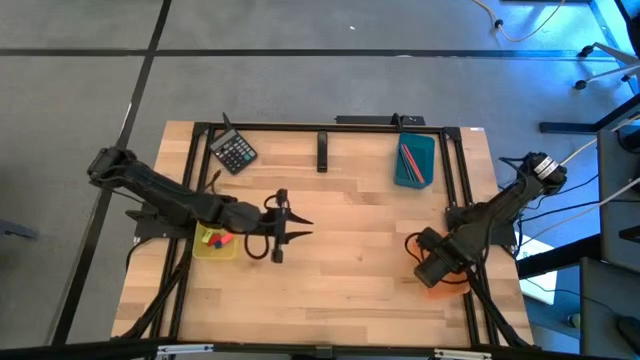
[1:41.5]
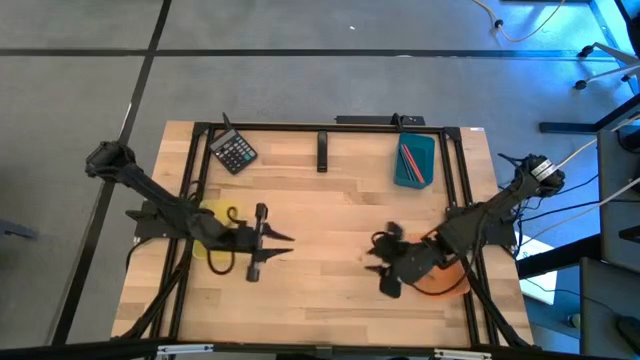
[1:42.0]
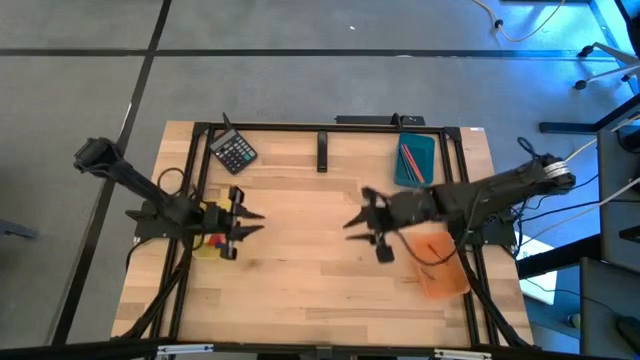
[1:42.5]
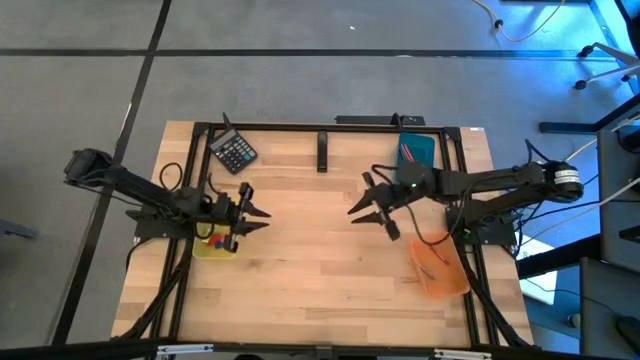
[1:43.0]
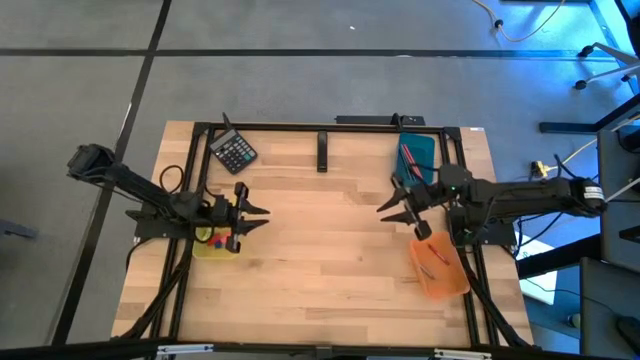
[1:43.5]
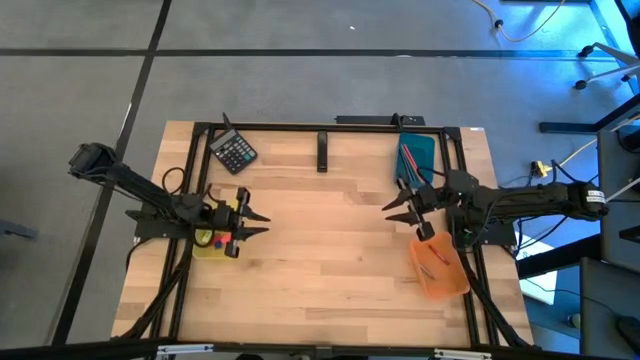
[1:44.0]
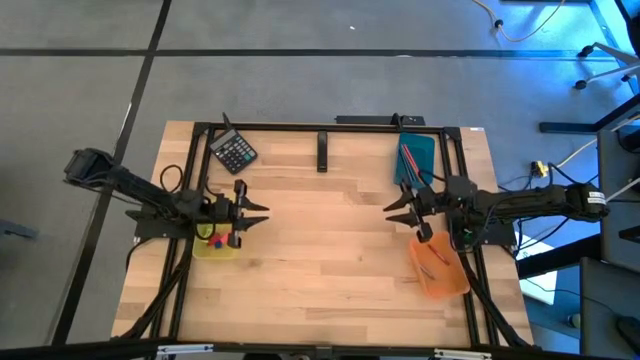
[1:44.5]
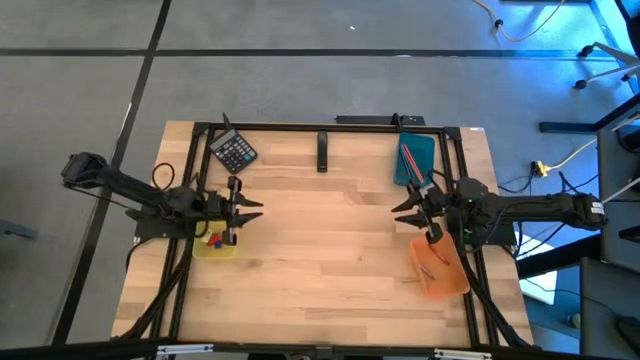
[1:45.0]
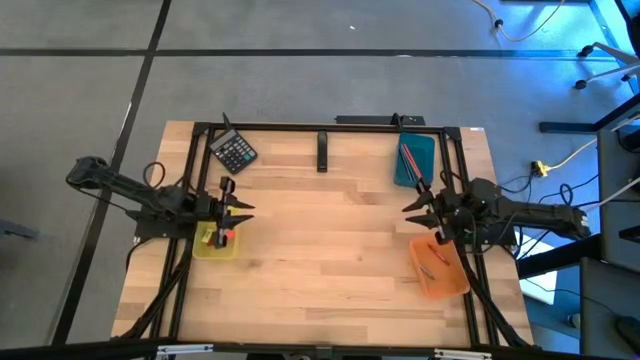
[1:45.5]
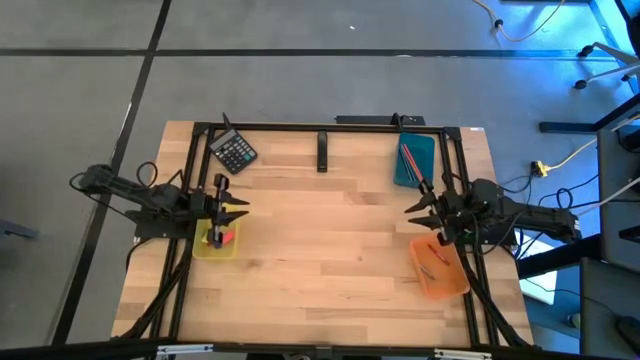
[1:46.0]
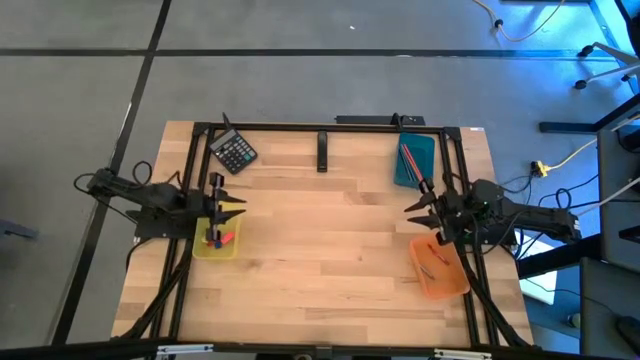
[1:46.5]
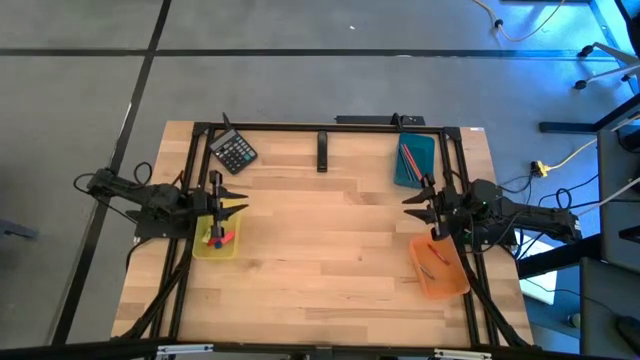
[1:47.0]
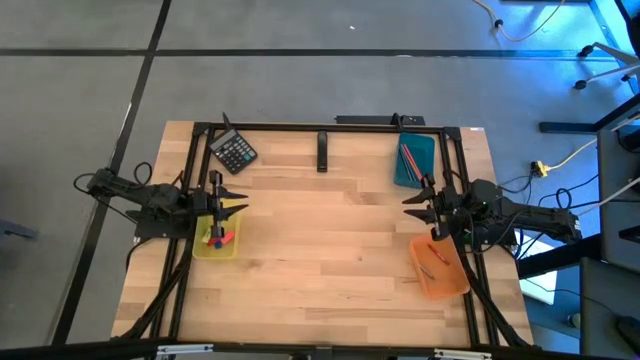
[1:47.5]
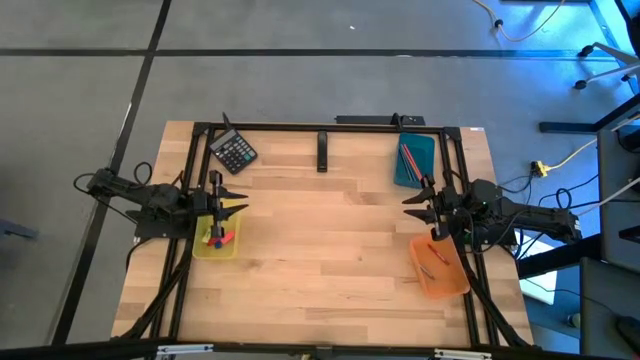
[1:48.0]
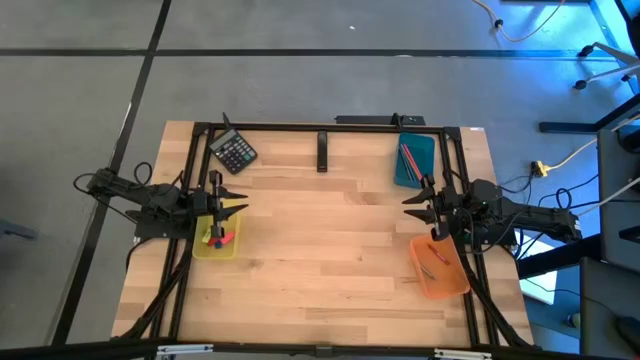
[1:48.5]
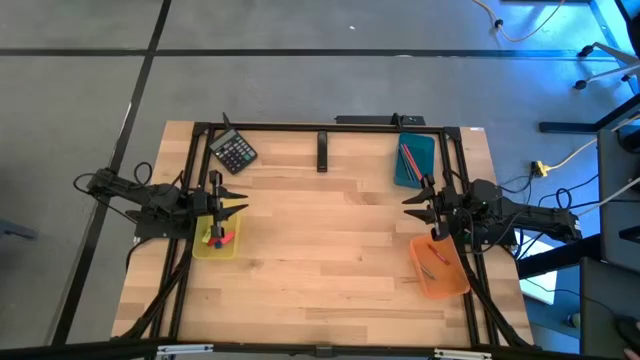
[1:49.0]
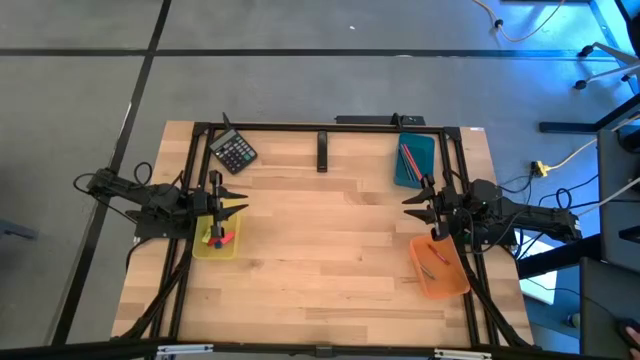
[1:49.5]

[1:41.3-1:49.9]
Task: Sort crayons/erasers/pens/pencils in bins
Return to Home Position

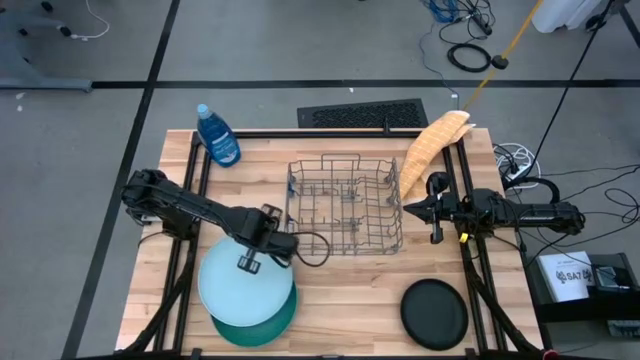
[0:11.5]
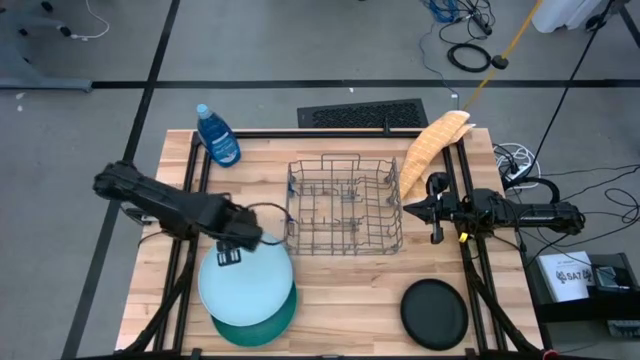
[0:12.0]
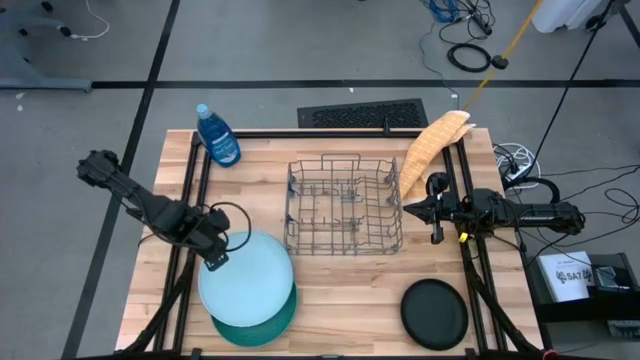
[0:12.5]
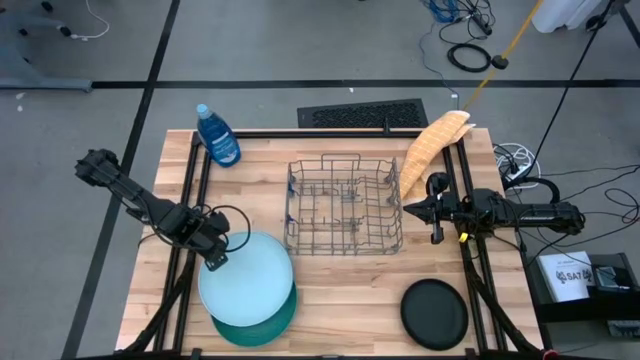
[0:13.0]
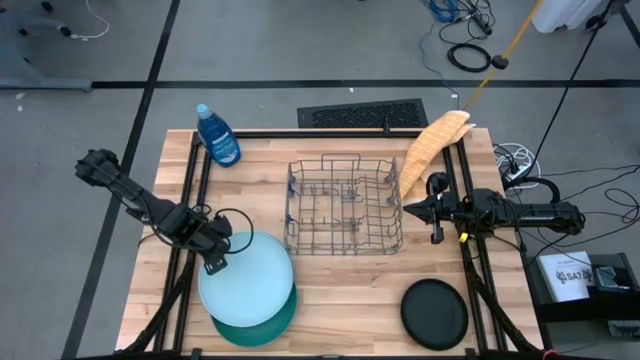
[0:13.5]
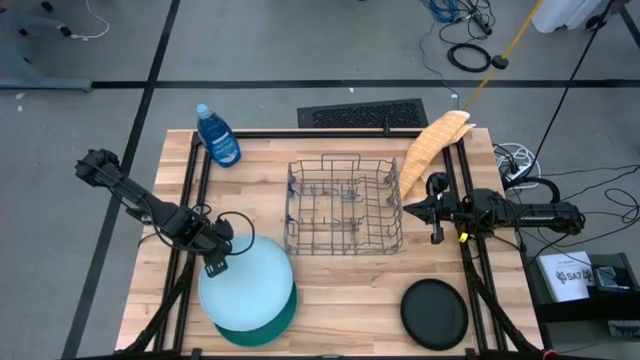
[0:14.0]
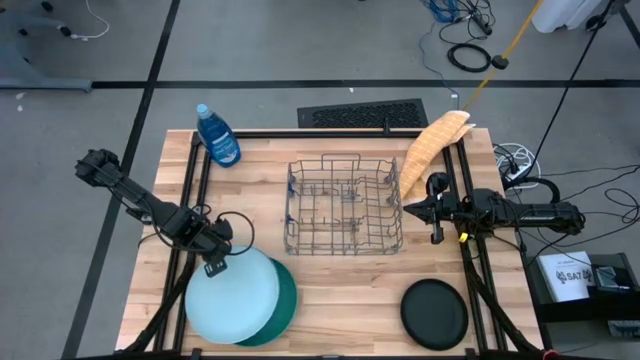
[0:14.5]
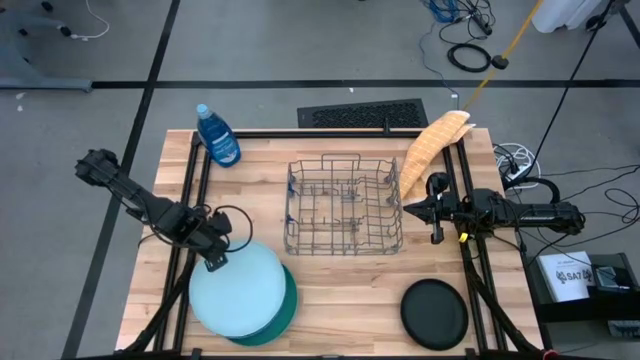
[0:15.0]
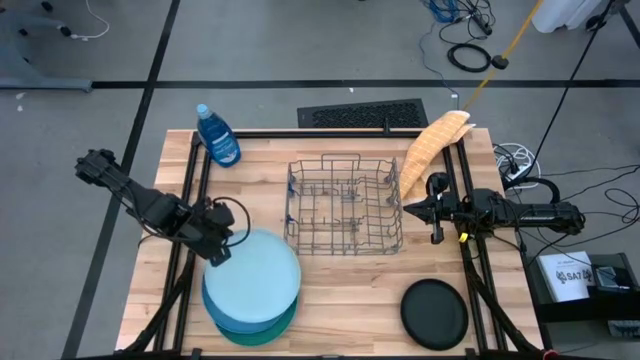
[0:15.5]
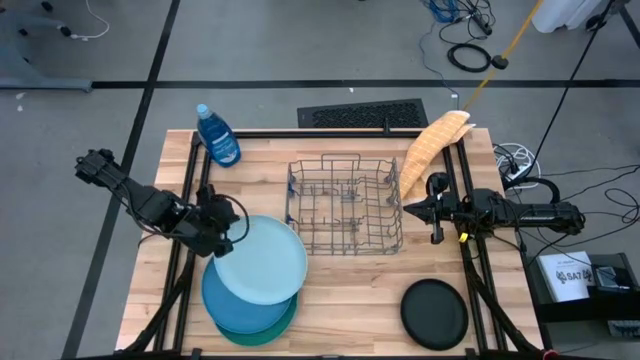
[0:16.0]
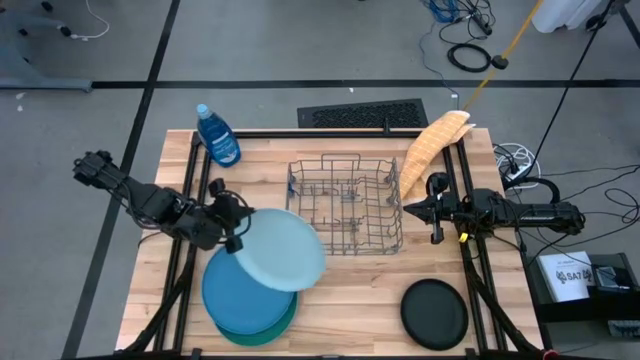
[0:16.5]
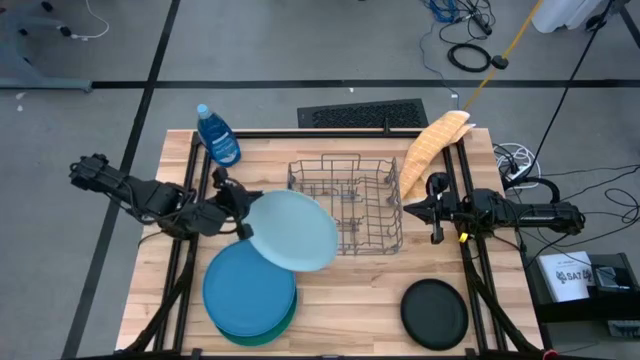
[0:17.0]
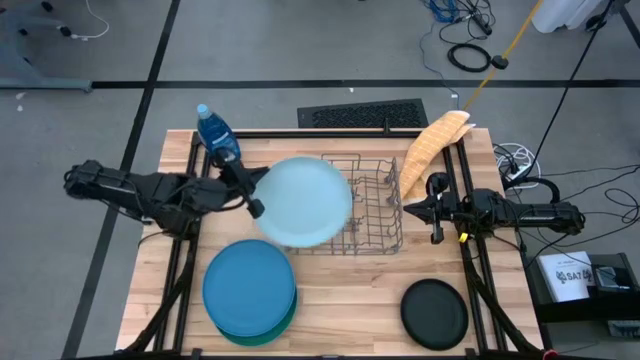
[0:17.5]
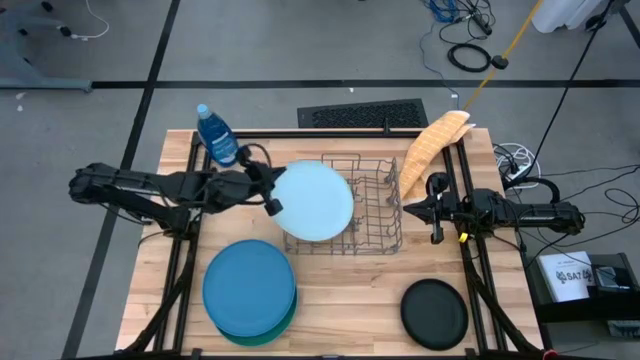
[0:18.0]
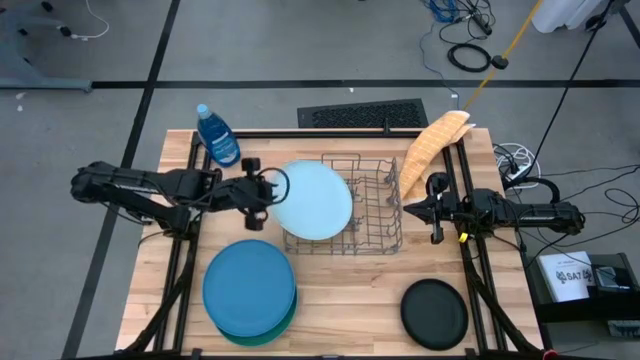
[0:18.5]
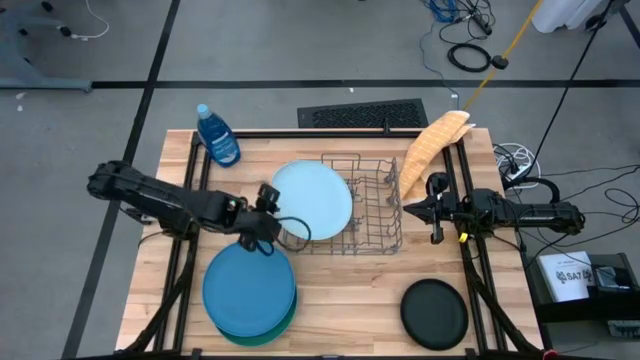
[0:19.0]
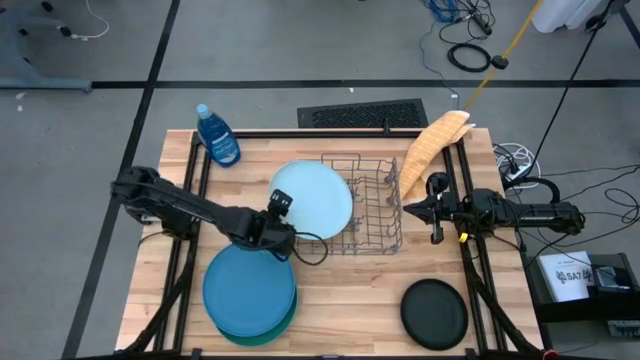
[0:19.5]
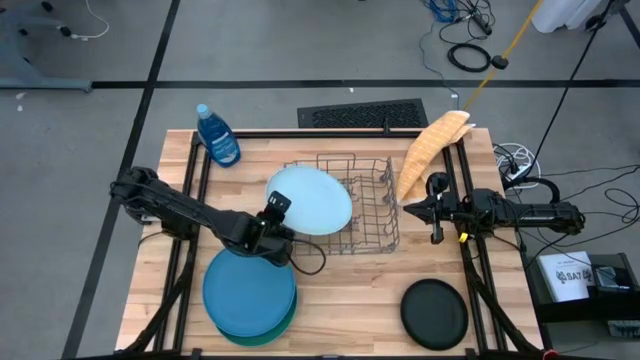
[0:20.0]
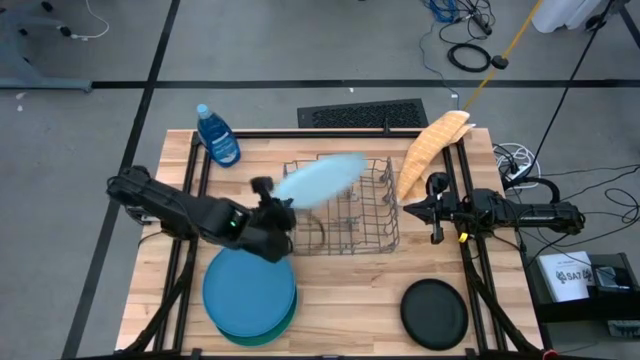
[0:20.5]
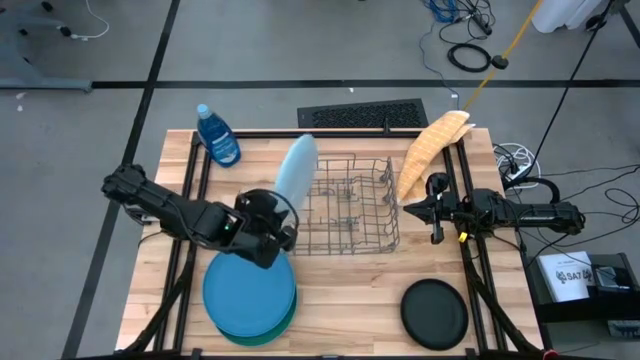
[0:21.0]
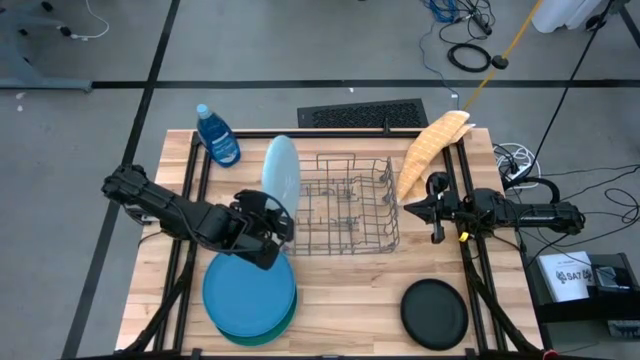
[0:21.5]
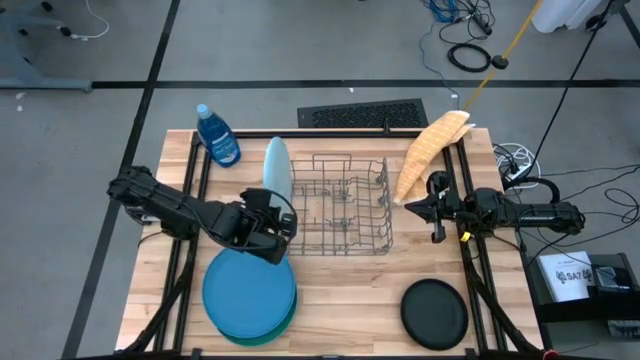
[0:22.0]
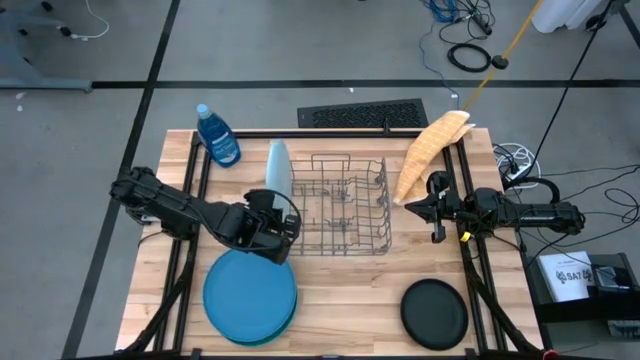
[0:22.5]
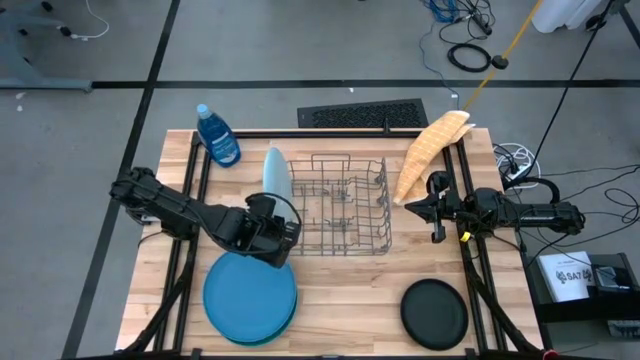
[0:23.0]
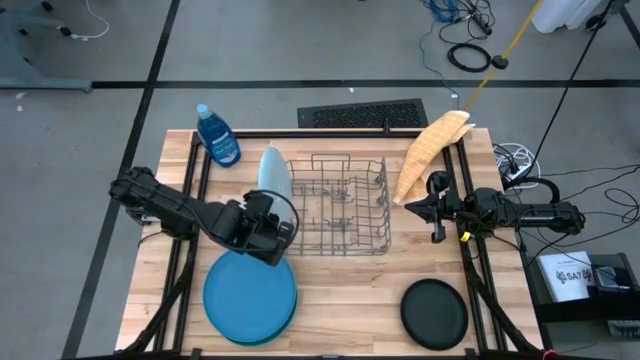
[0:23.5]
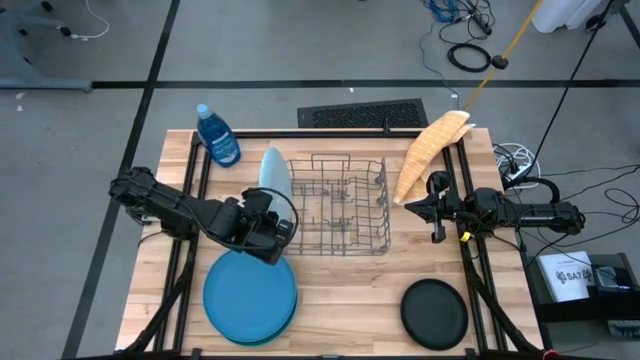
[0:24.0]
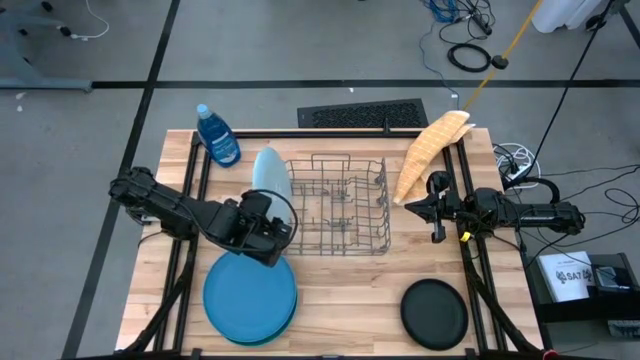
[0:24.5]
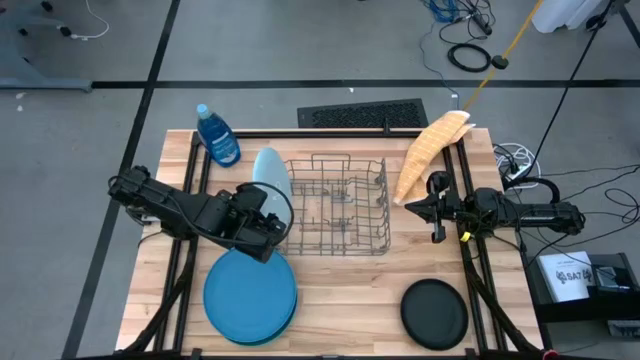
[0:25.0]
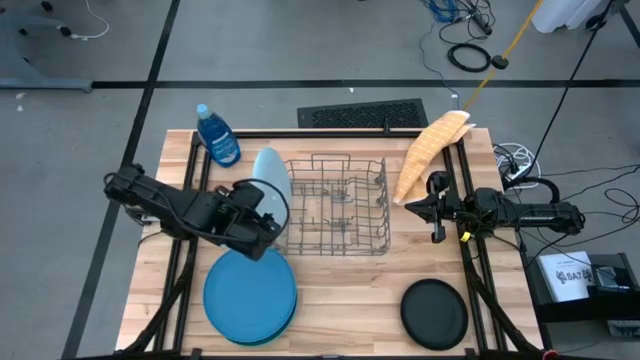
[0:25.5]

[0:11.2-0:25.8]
Task: Sort dishes
Put the light blue plate into the dish rack
